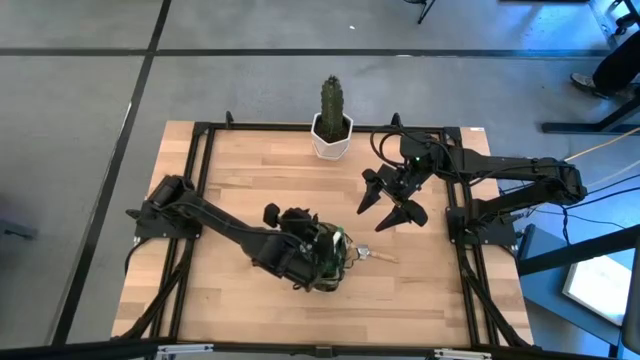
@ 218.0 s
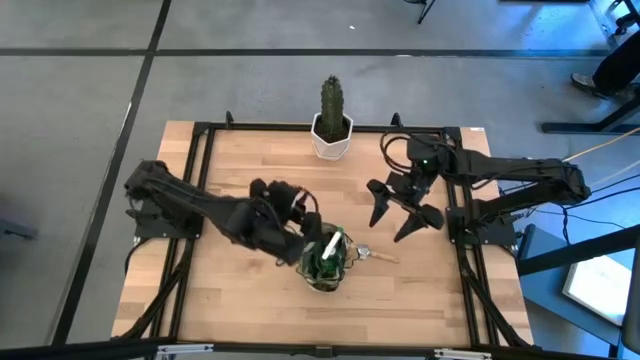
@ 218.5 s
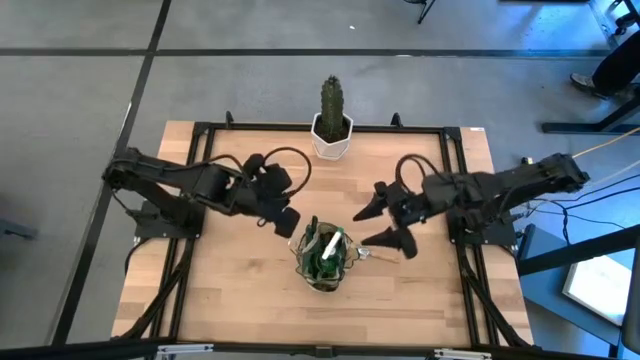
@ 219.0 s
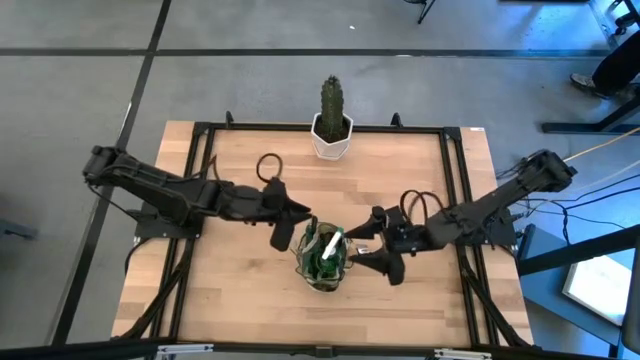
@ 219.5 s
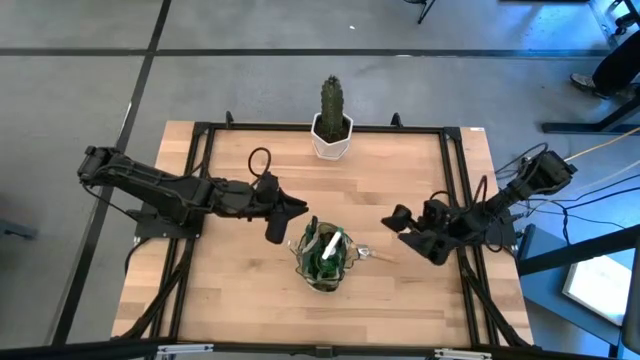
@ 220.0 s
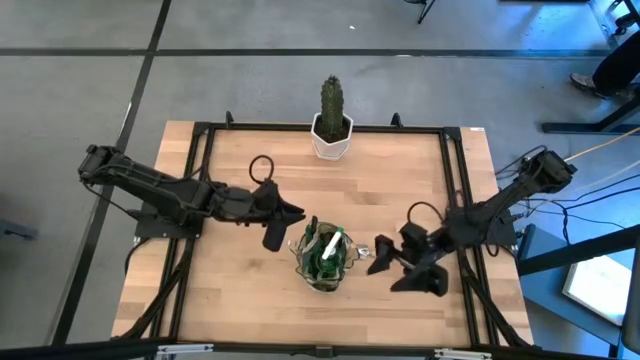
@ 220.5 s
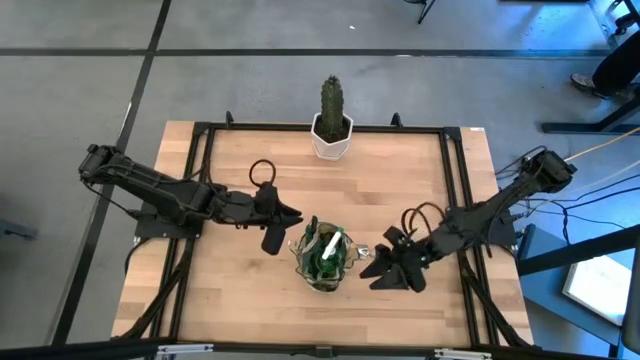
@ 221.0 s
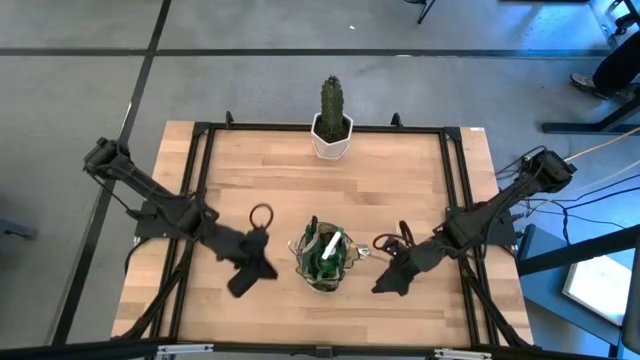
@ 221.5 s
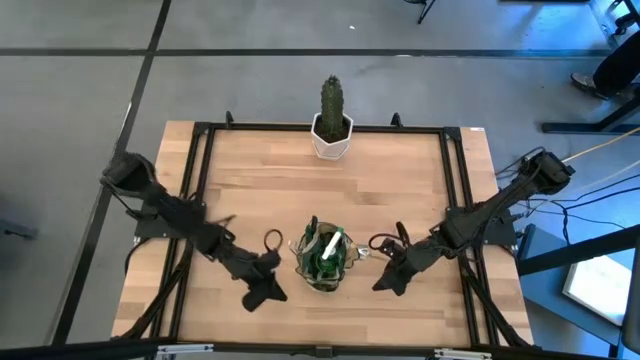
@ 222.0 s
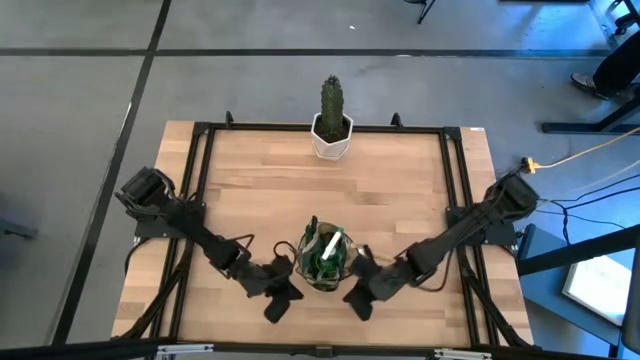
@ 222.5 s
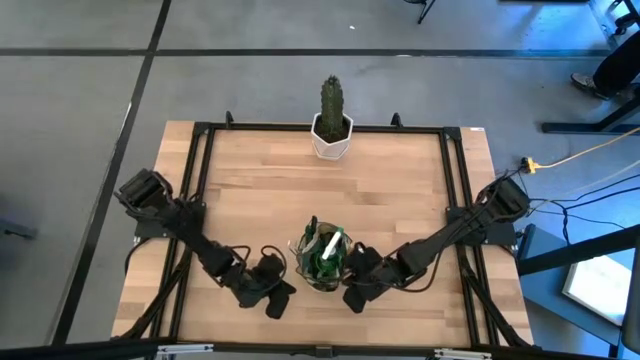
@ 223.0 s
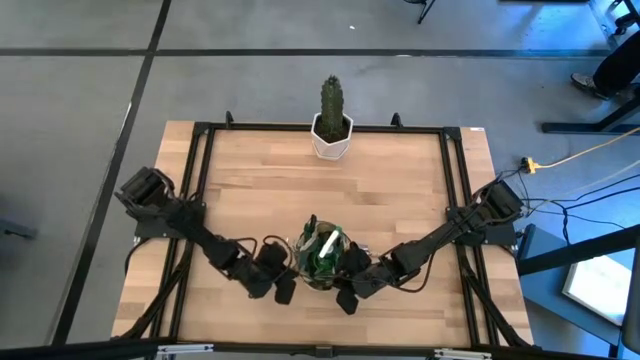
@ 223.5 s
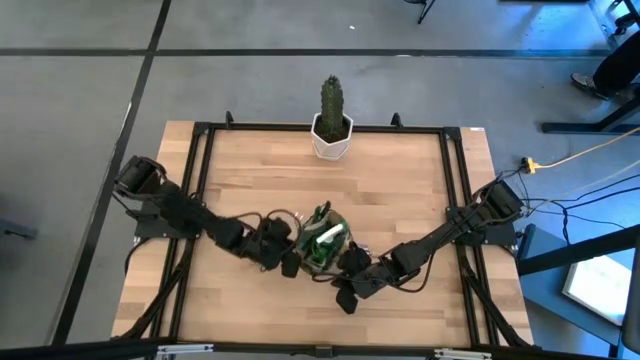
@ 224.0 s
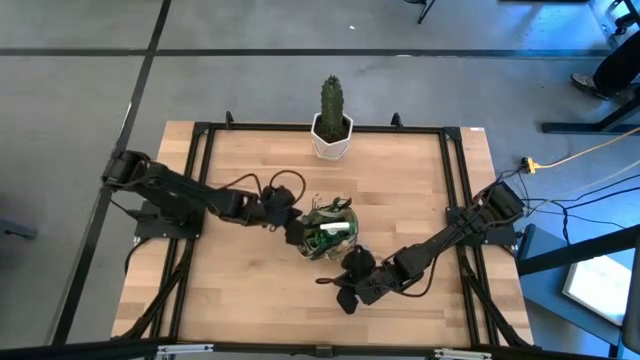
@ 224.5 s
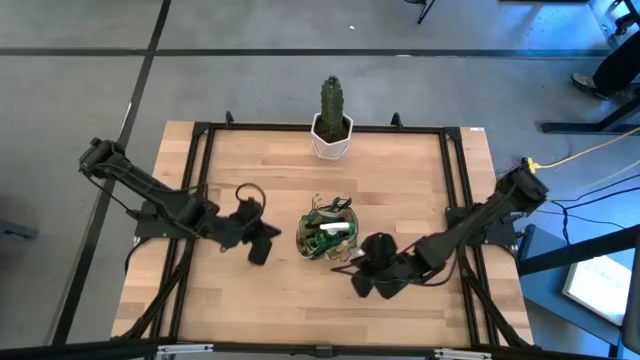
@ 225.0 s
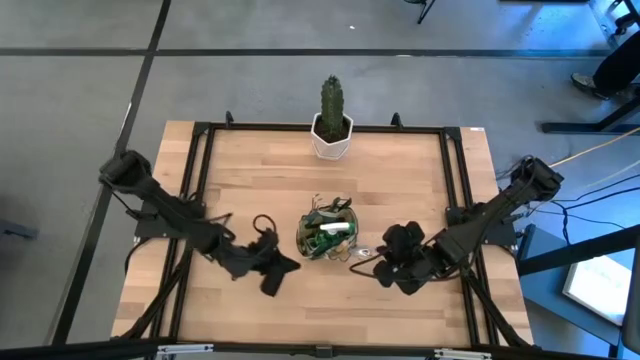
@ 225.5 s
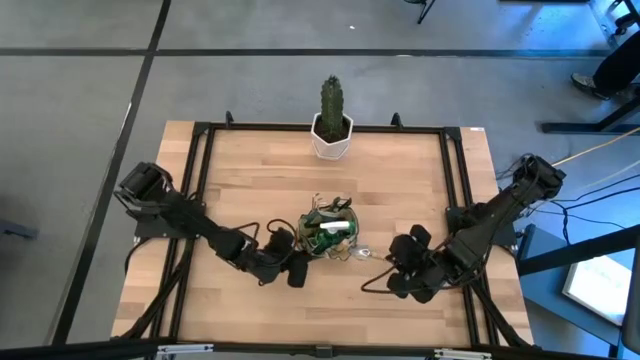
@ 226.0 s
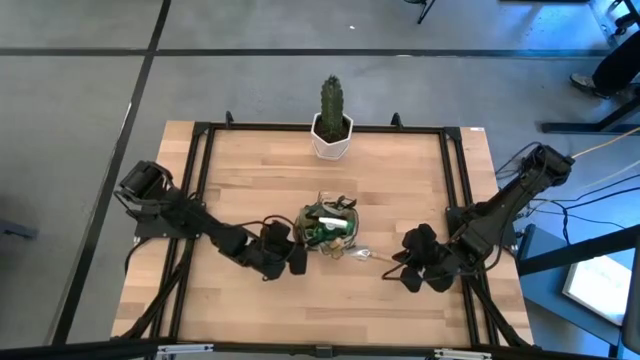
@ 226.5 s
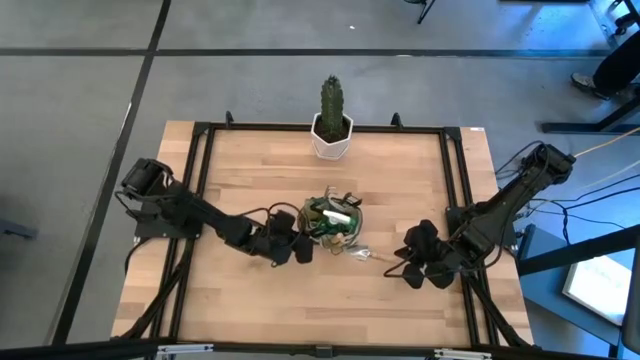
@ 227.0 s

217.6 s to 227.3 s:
Task: Pick & Place Garden tools in Gardening bag
Move the gardening bag to the center of the table

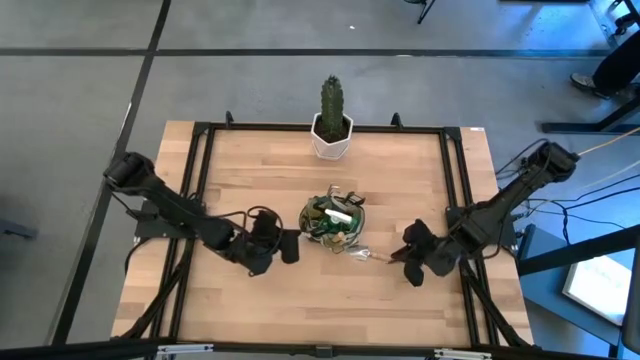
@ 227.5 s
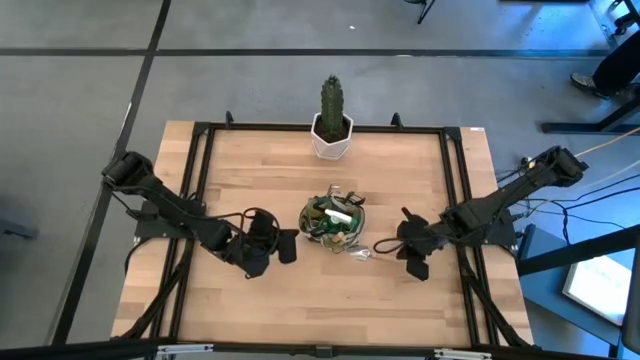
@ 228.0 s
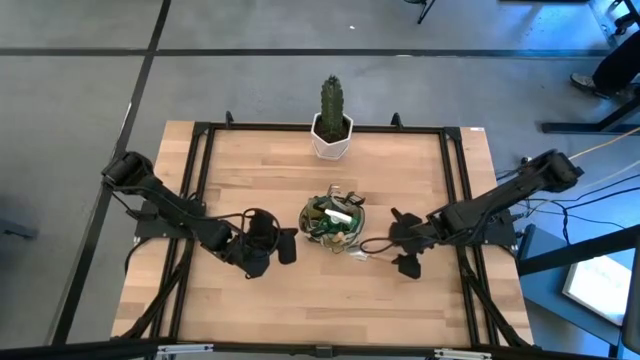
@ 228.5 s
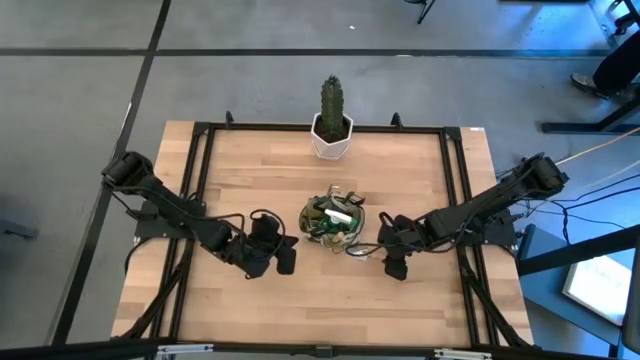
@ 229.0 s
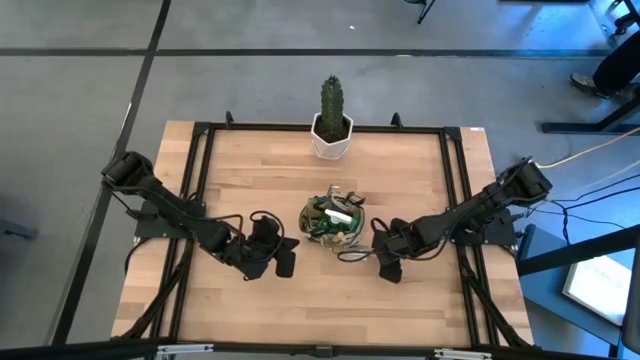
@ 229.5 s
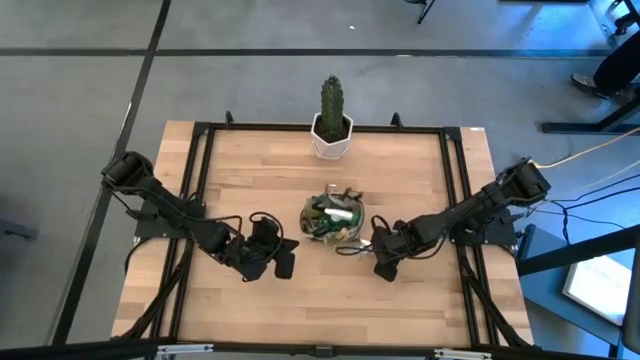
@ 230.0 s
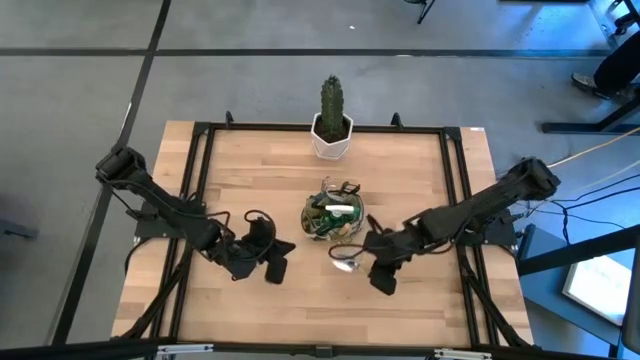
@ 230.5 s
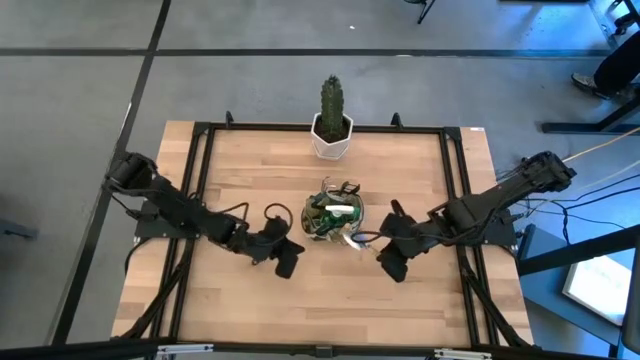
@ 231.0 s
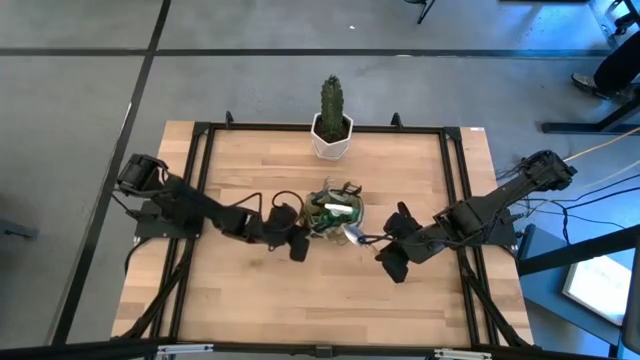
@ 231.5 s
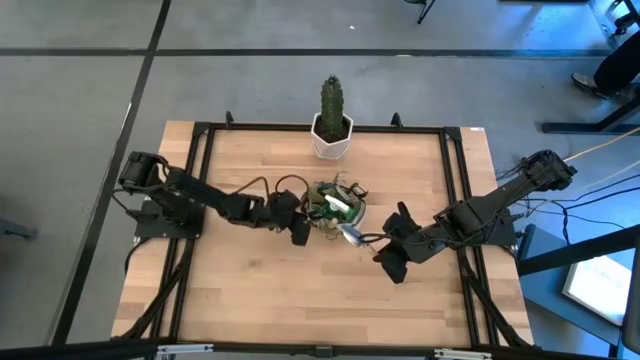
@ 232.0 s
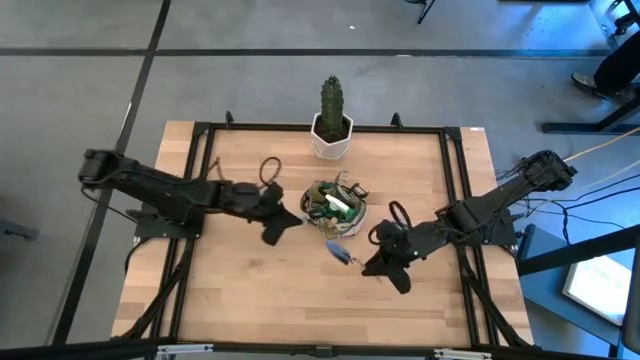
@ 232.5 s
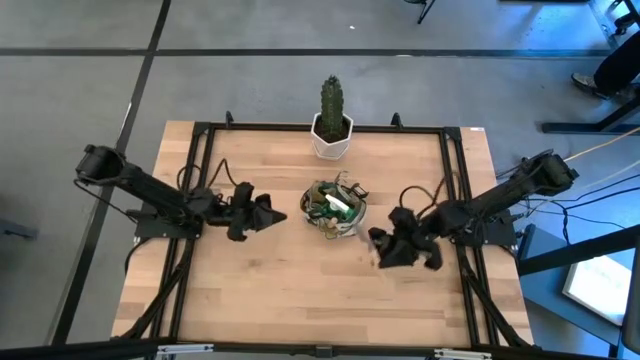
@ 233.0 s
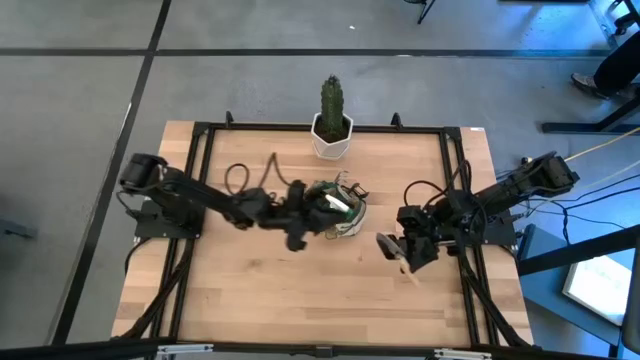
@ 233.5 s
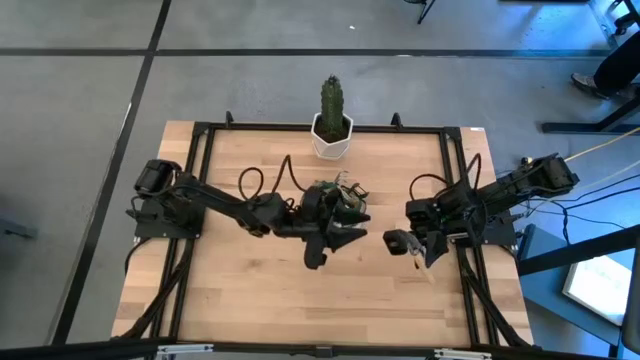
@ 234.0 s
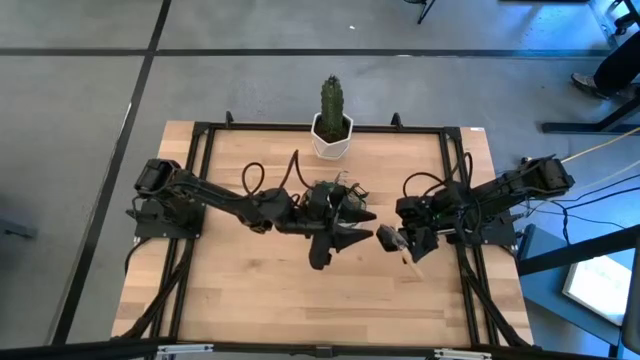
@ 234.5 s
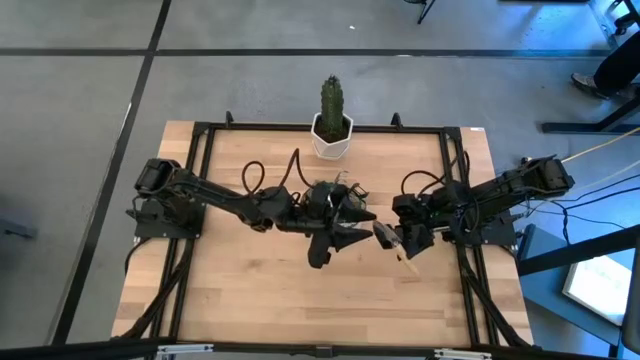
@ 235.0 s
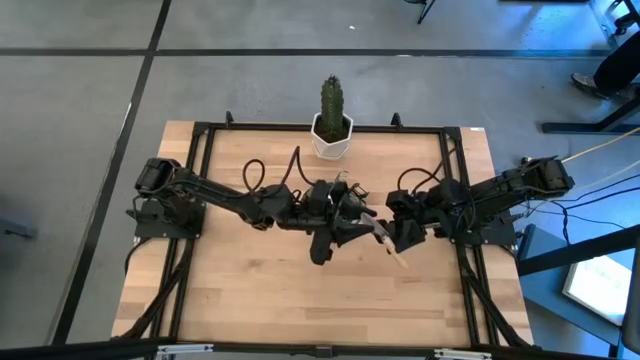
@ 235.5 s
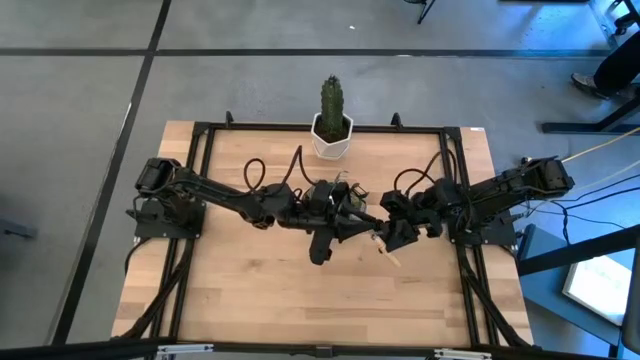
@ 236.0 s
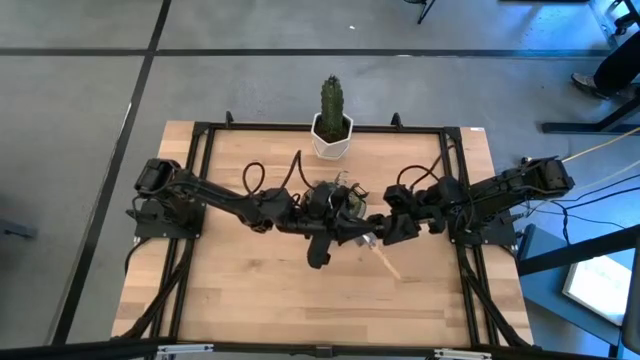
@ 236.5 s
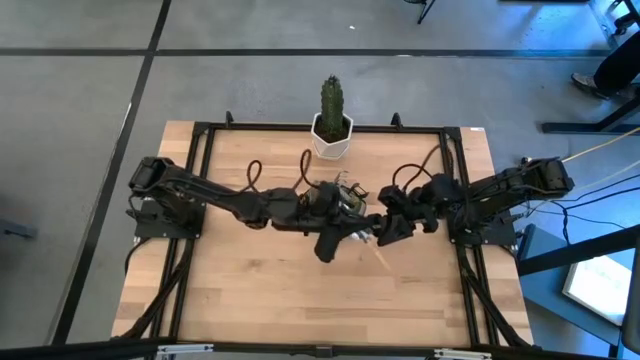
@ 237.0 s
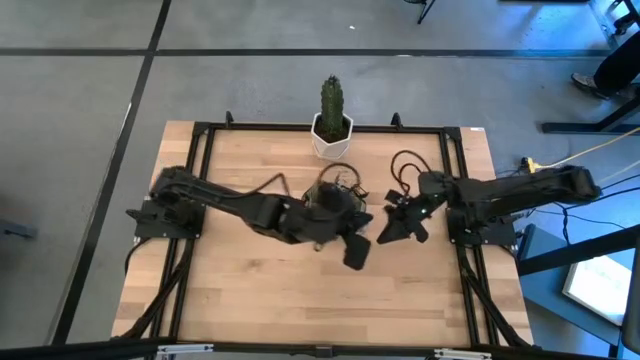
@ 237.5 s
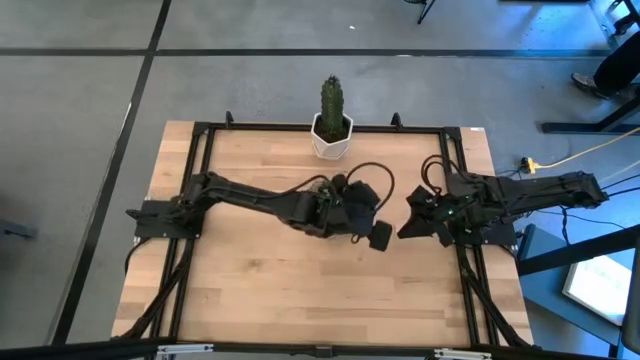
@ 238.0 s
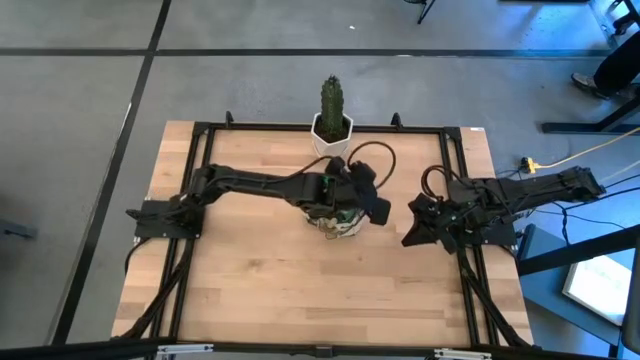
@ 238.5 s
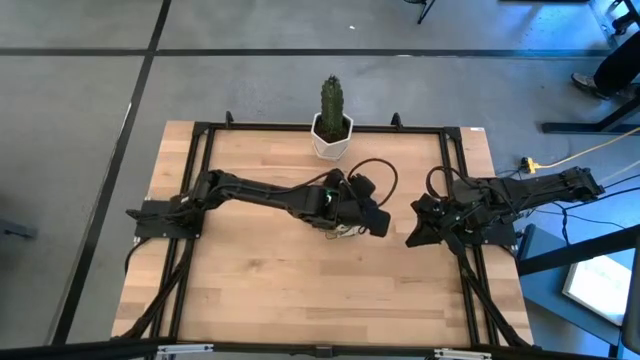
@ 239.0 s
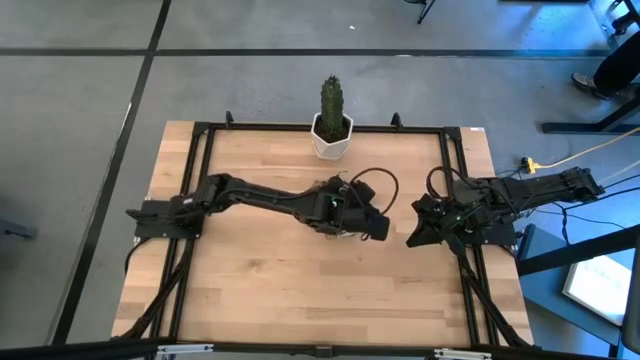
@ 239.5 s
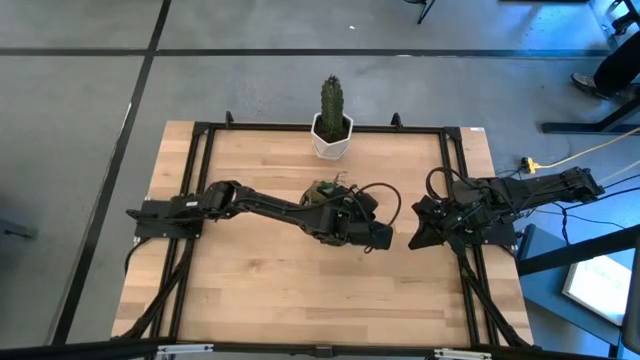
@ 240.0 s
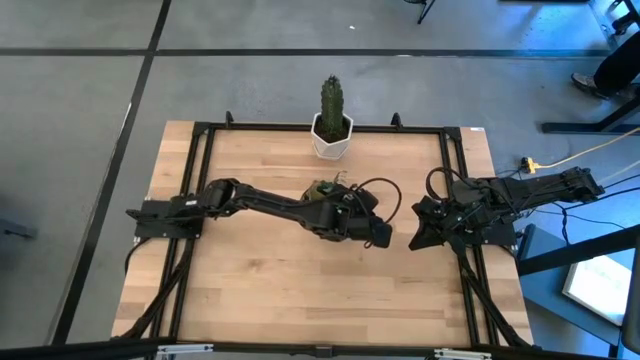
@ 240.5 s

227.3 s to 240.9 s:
Put the trowel into the gardening bag
